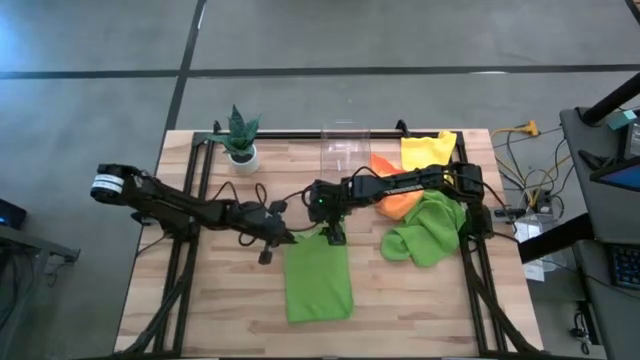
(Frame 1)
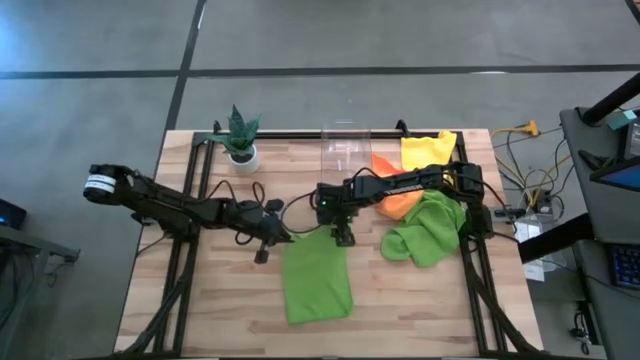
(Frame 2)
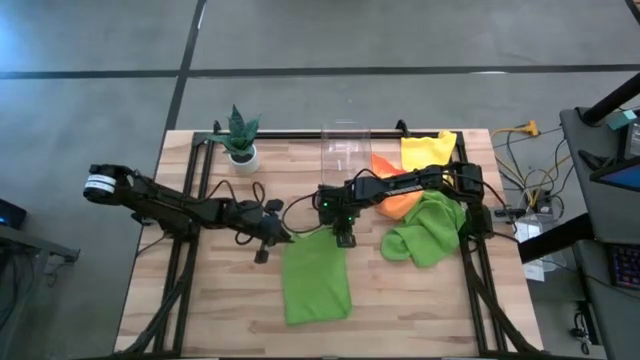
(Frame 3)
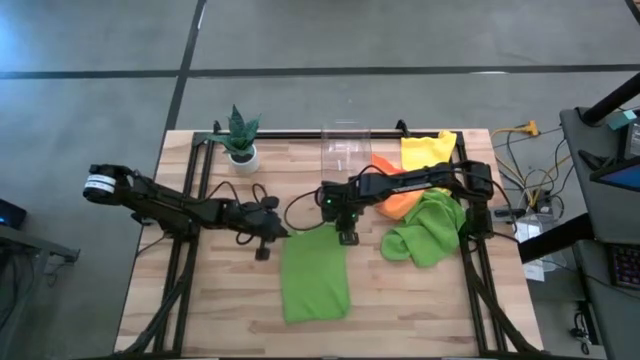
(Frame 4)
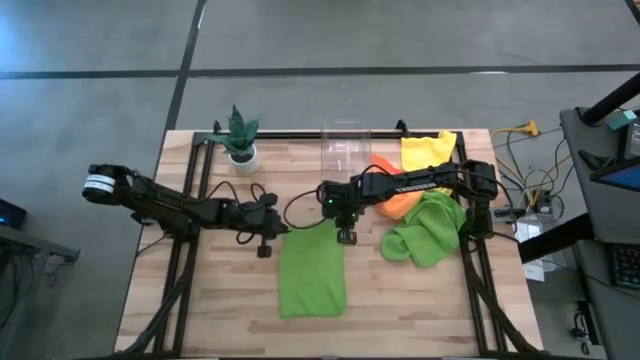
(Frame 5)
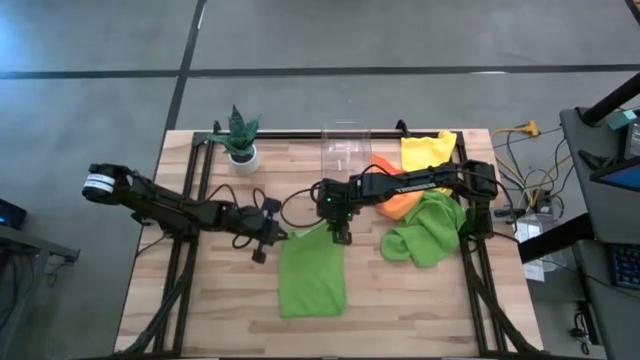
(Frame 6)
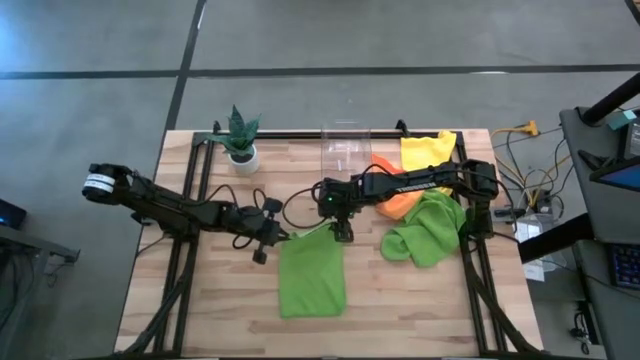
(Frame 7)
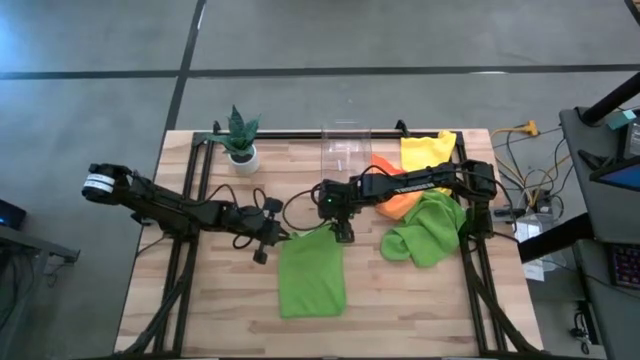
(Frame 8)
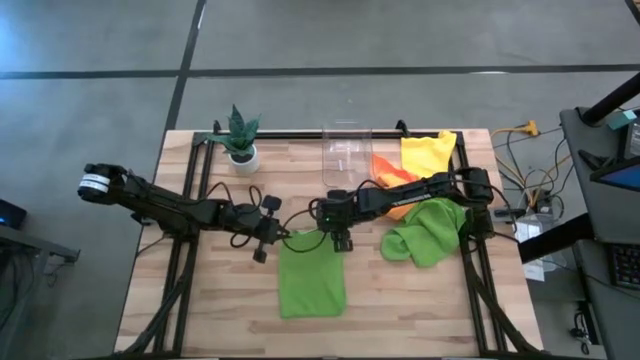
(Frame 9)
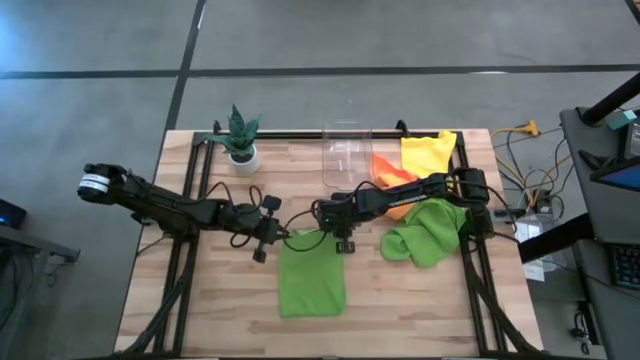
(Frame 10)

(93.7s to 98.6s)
Task: Fold microfiber towels
Fold the top green towel

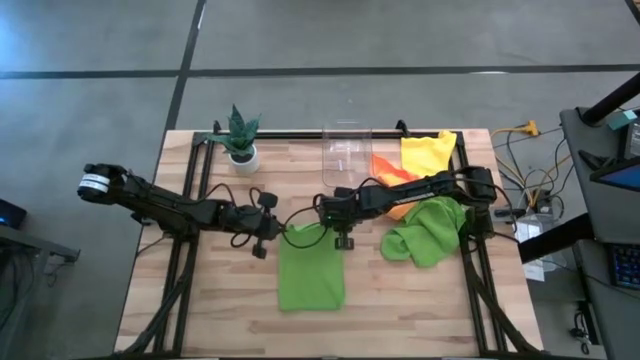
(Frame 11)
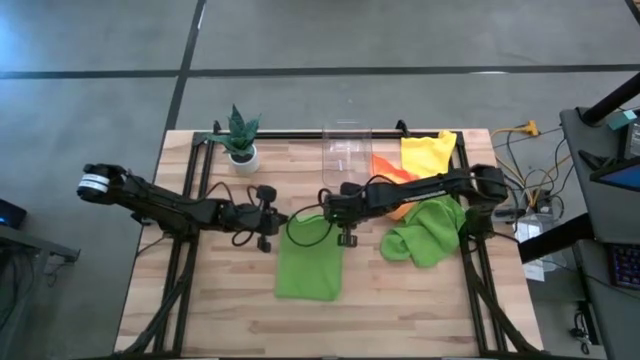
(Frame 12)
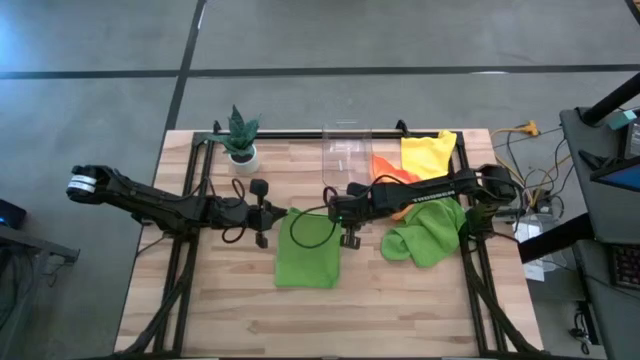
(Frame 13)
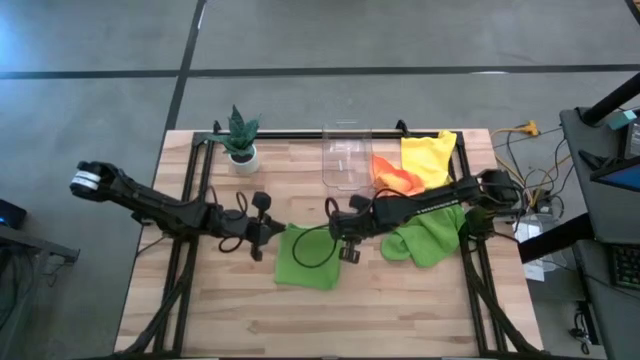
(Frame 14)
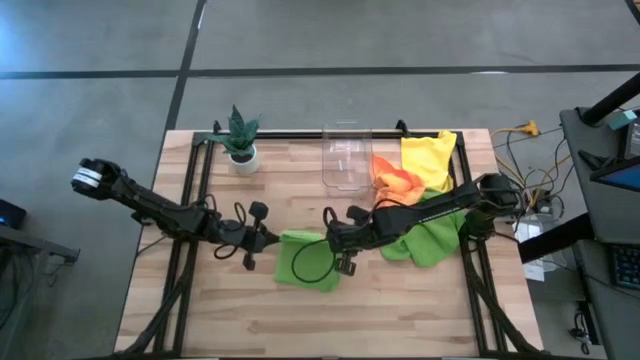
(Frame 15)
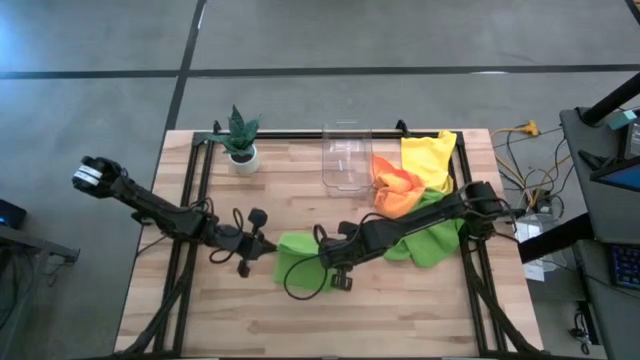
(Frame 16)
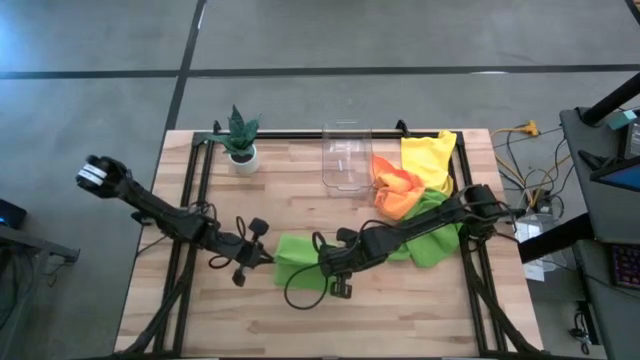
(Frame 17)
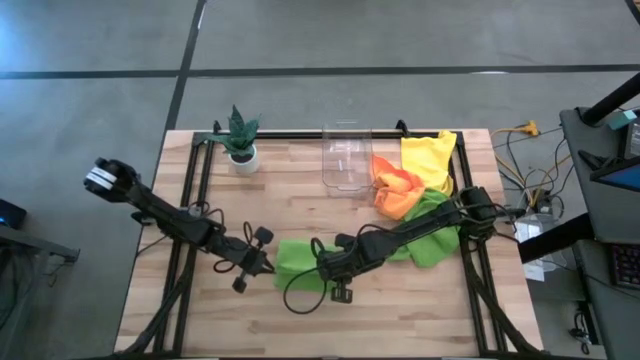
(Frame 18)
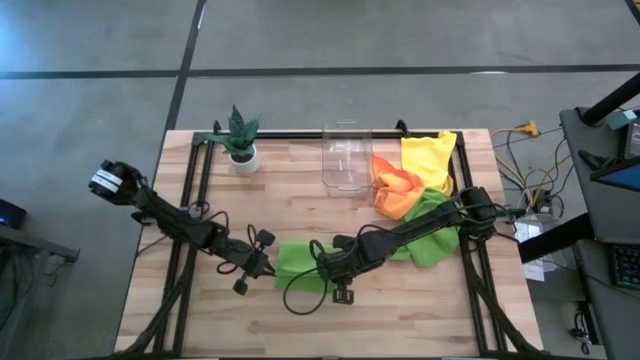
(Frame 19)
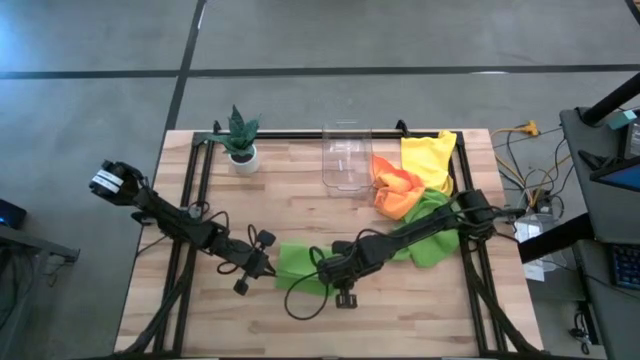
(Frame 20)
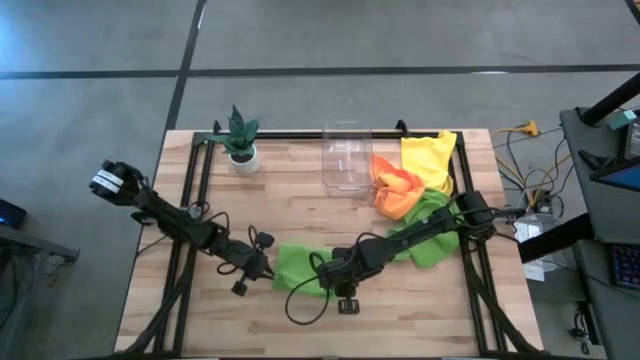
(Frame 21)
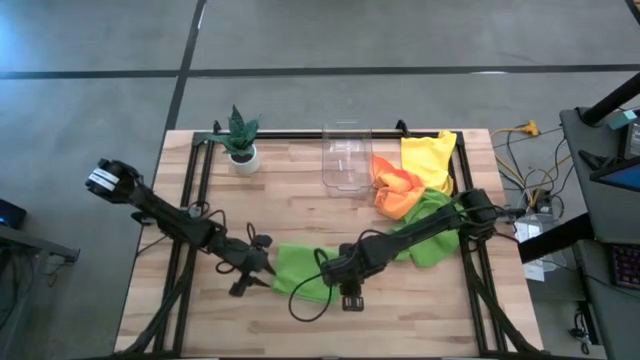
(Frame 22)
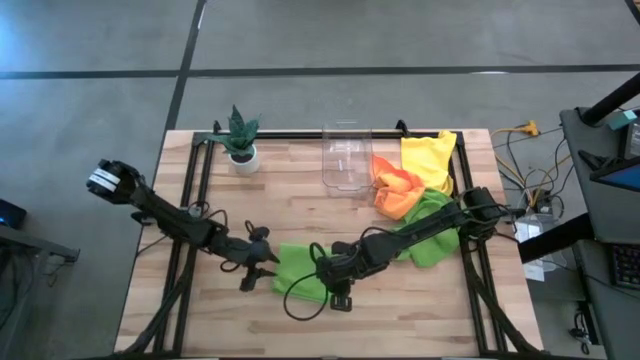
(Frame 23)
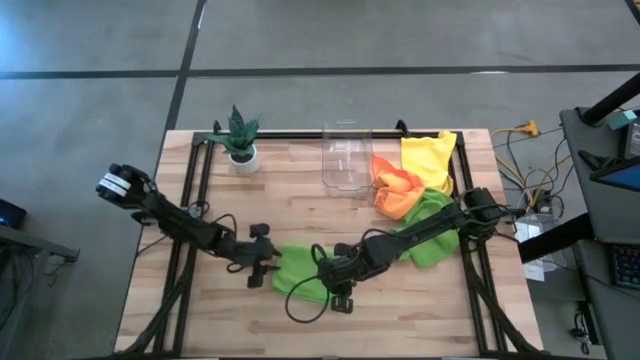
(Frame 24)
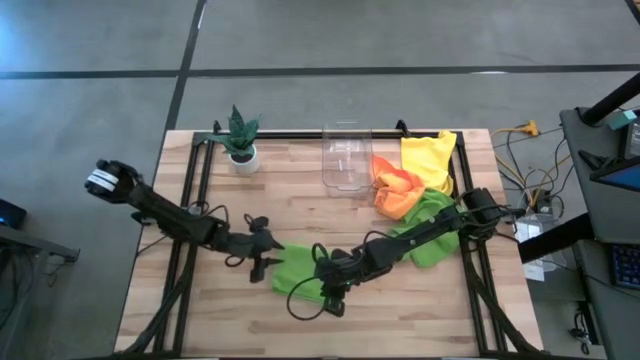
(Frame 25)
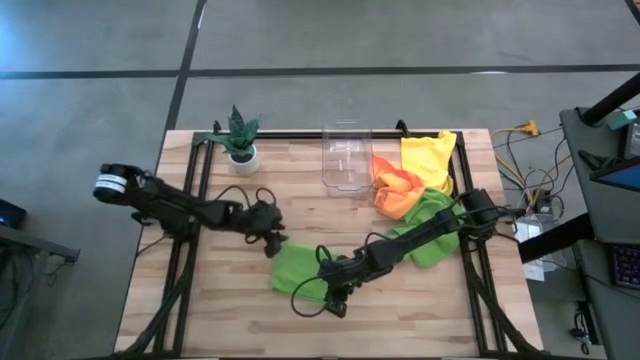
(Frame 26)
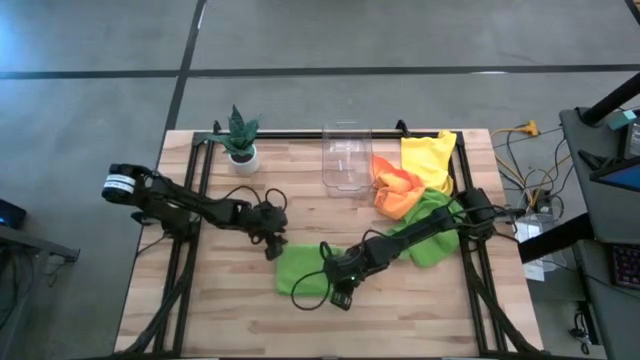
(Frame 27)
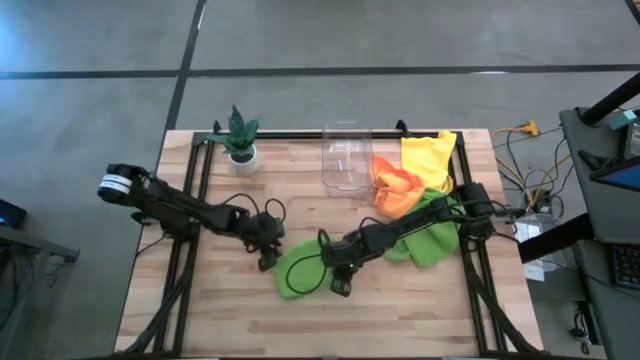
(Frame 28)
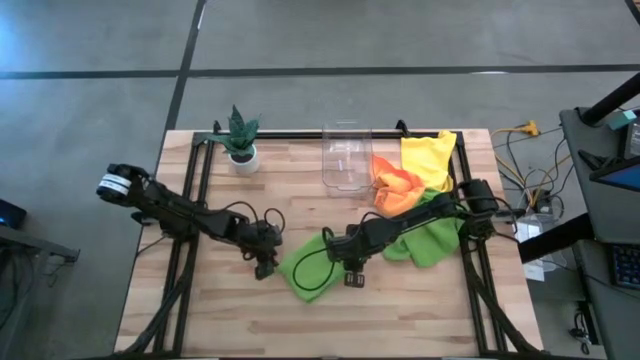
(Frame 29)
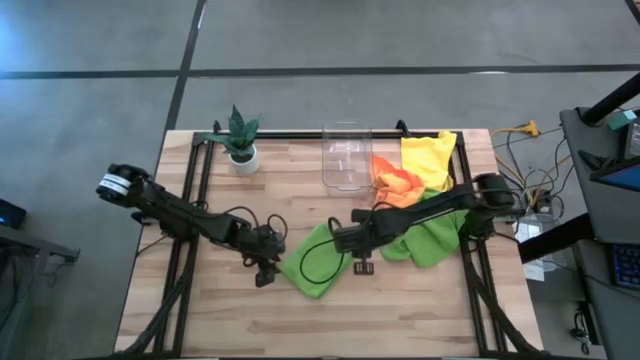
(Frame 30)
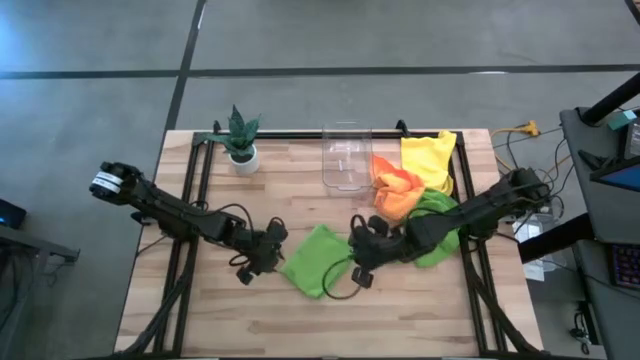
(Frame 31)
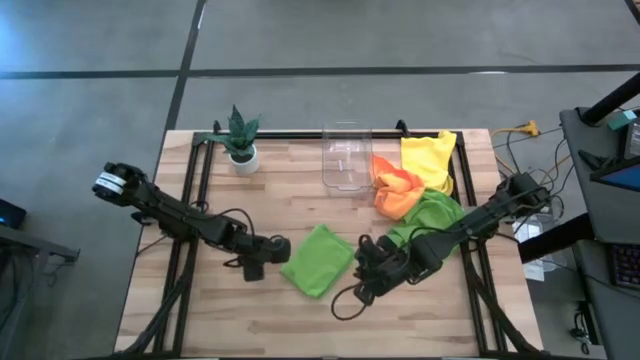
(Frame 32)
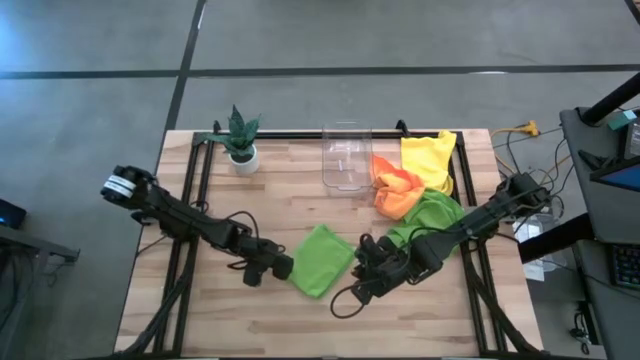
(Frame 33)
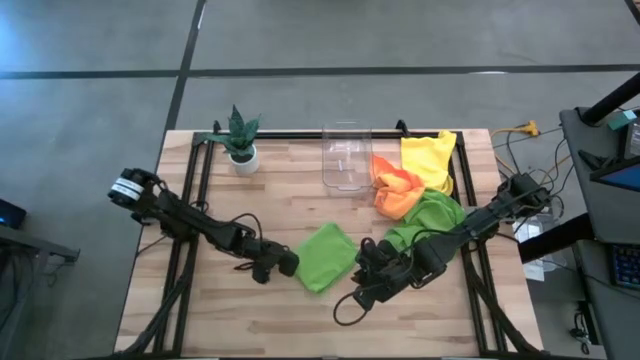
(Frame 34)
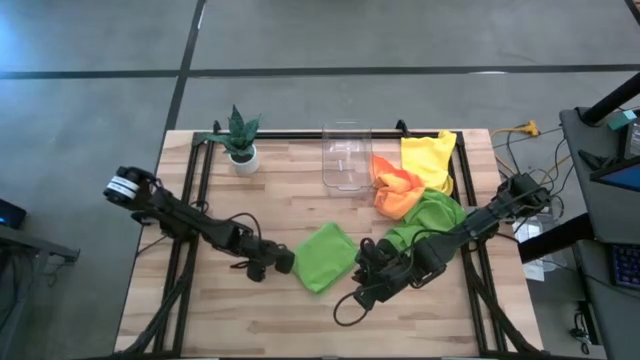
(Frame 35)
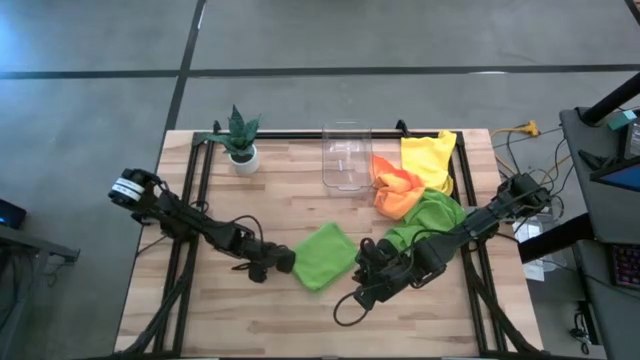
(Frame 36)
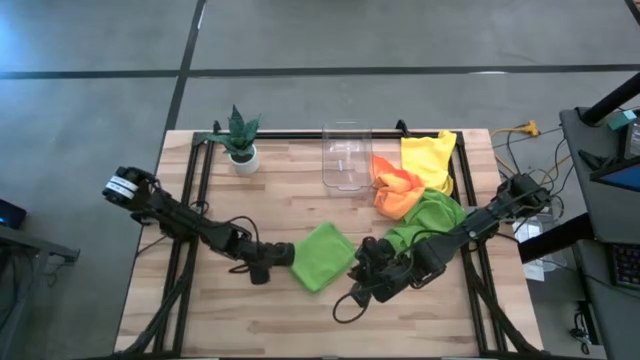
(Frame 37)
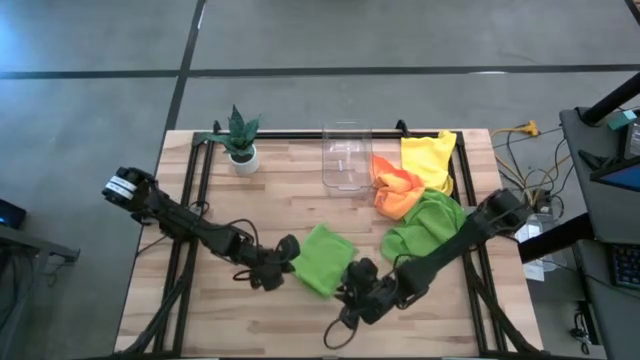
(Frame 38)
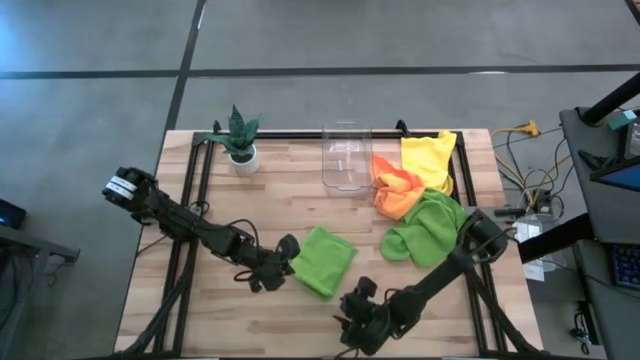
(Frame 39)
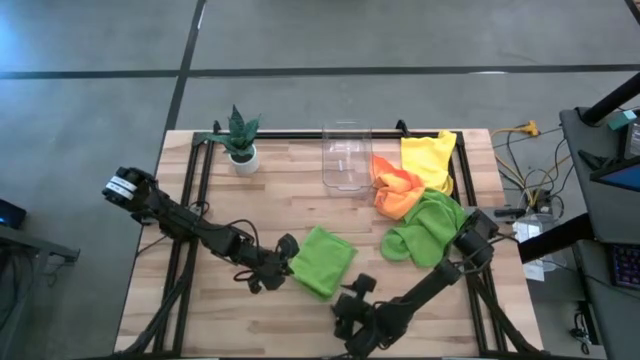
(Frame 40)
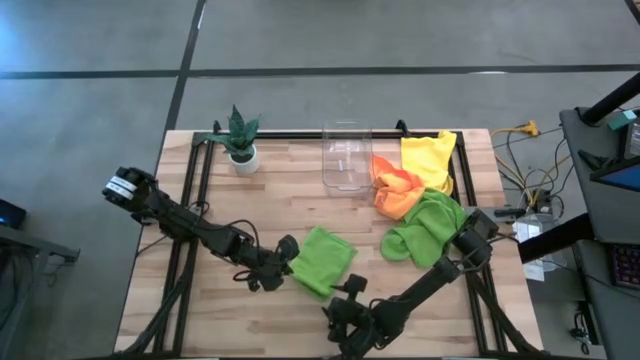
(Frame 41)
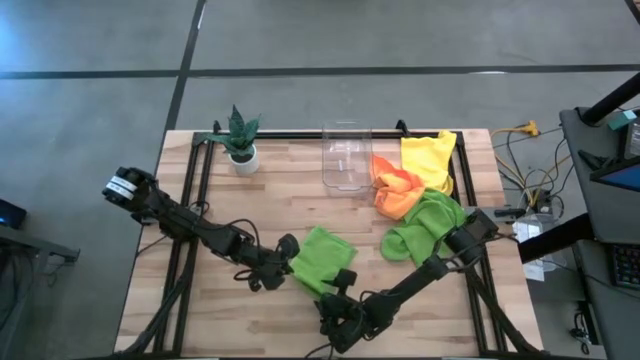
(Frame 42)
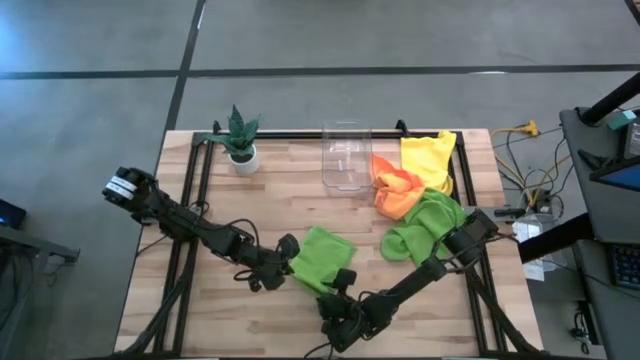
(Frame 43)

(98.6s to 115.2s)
Fold the top green towel
